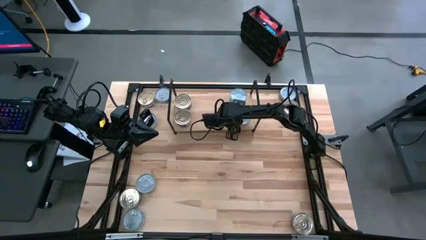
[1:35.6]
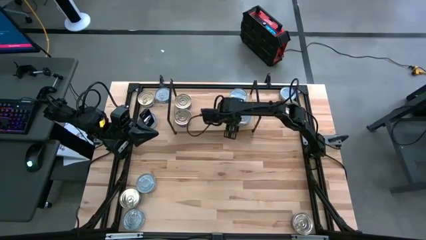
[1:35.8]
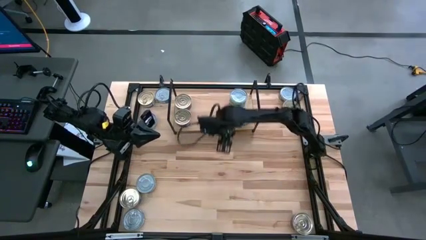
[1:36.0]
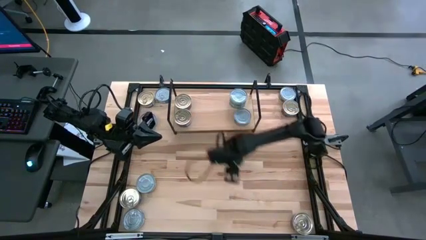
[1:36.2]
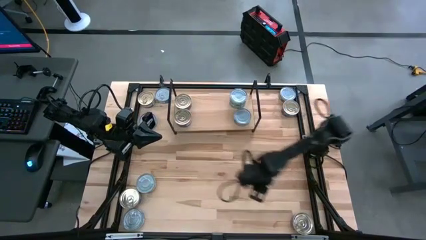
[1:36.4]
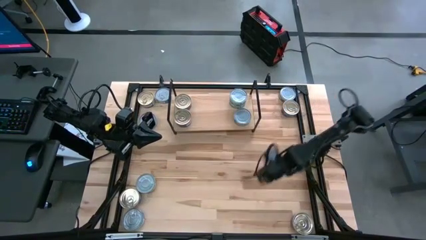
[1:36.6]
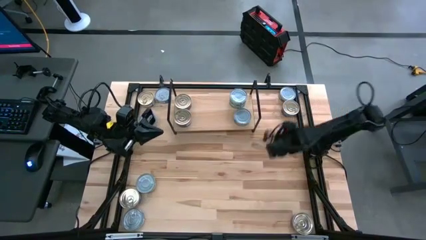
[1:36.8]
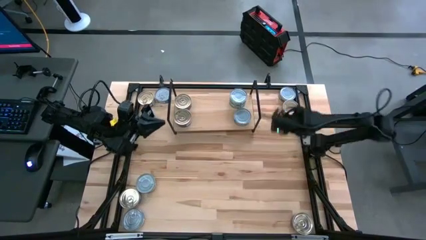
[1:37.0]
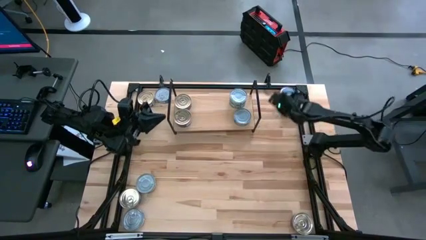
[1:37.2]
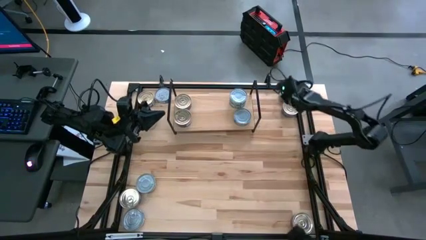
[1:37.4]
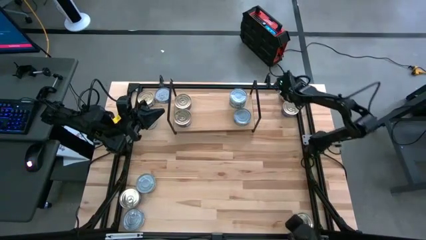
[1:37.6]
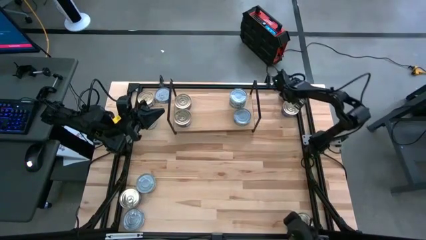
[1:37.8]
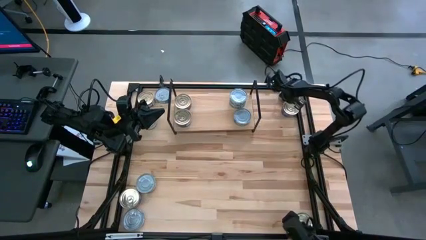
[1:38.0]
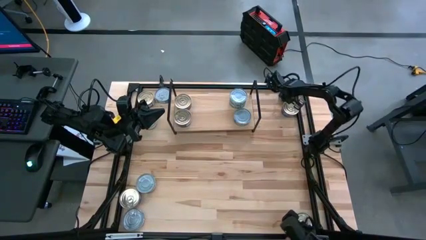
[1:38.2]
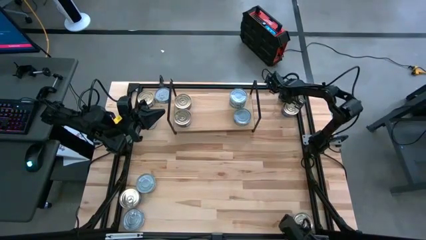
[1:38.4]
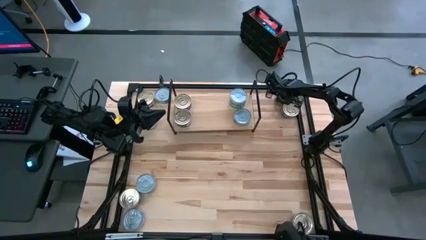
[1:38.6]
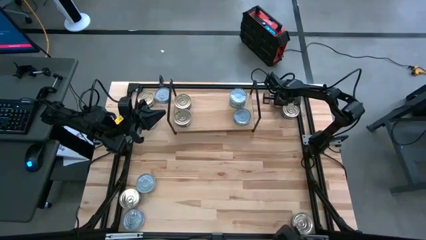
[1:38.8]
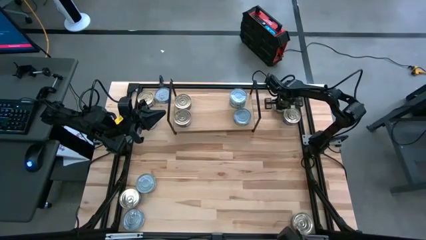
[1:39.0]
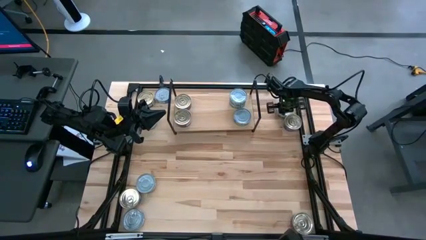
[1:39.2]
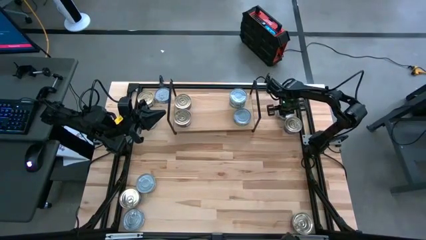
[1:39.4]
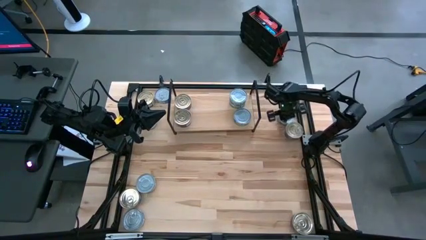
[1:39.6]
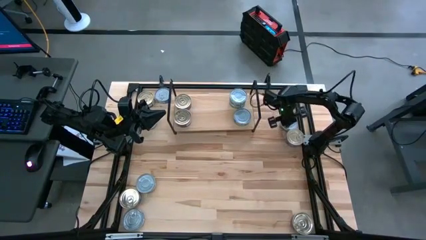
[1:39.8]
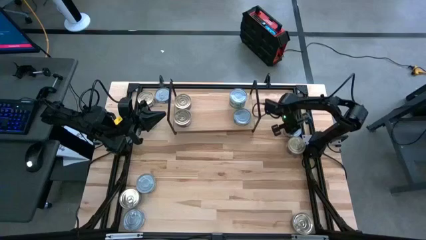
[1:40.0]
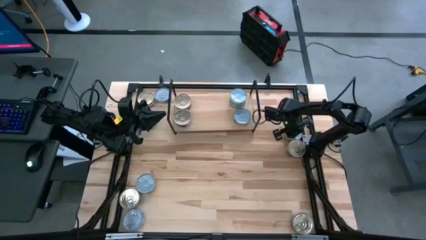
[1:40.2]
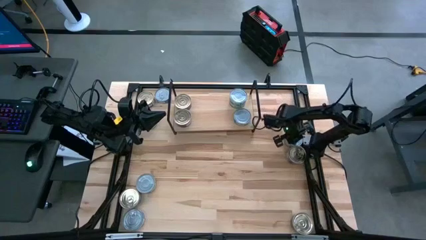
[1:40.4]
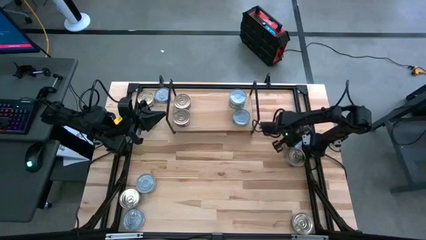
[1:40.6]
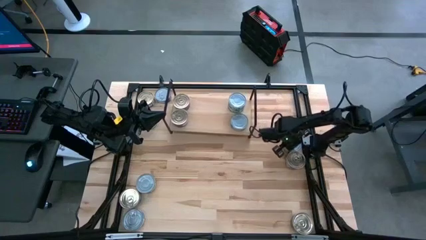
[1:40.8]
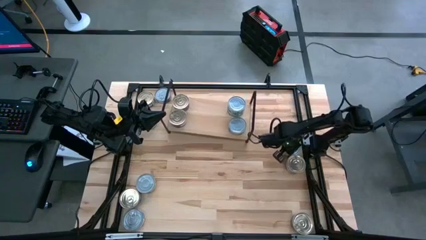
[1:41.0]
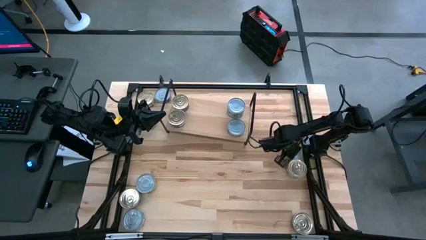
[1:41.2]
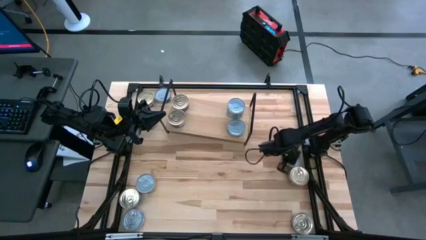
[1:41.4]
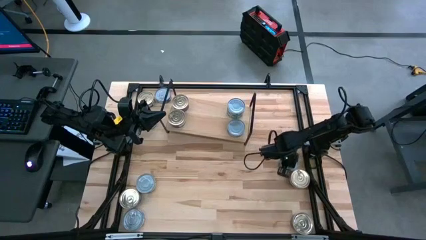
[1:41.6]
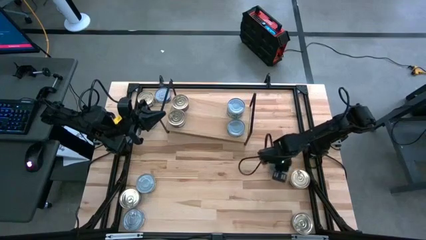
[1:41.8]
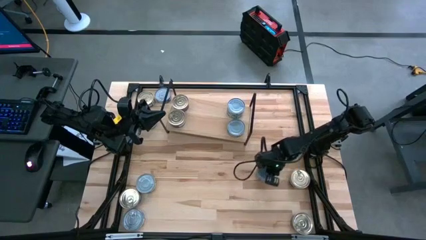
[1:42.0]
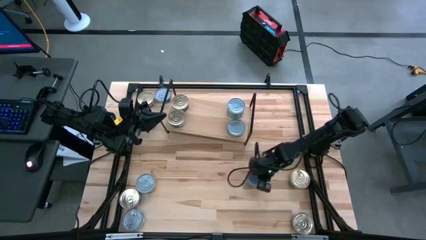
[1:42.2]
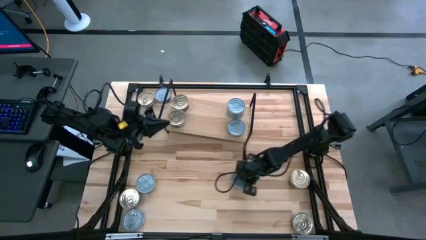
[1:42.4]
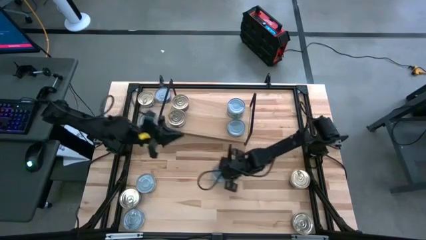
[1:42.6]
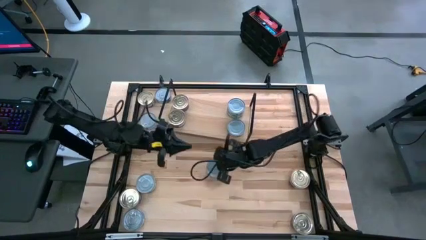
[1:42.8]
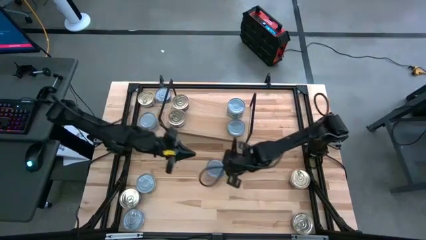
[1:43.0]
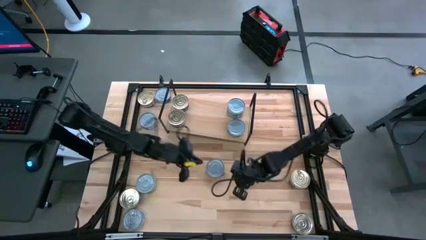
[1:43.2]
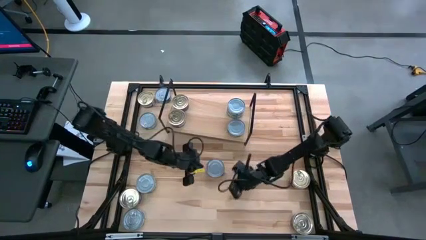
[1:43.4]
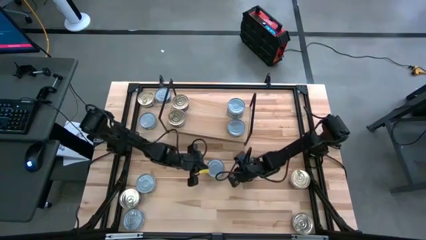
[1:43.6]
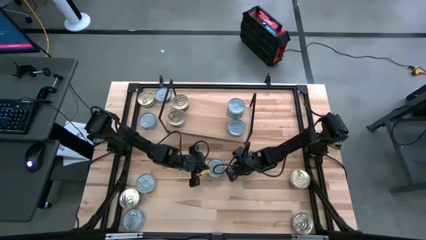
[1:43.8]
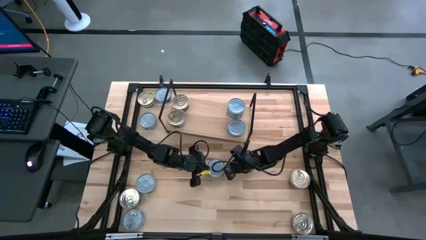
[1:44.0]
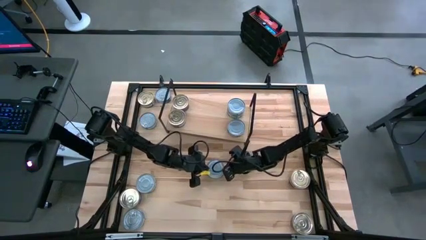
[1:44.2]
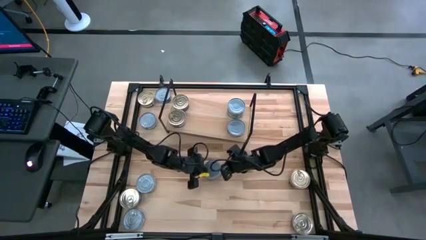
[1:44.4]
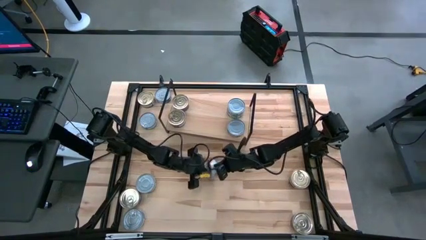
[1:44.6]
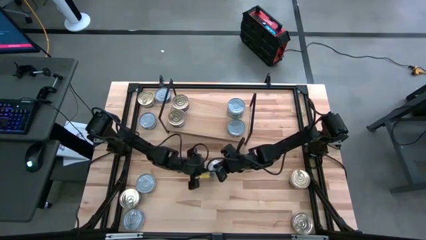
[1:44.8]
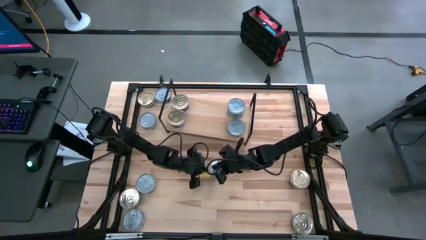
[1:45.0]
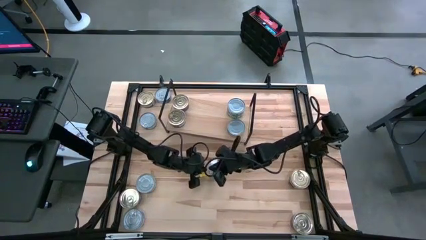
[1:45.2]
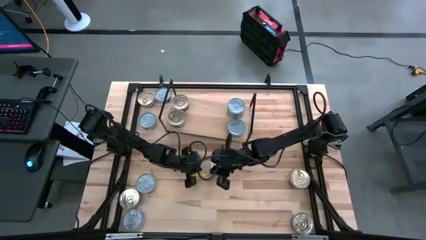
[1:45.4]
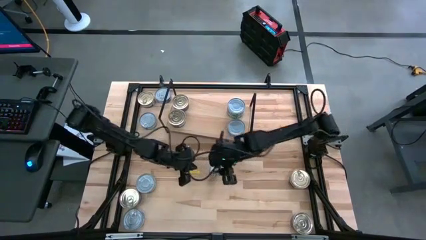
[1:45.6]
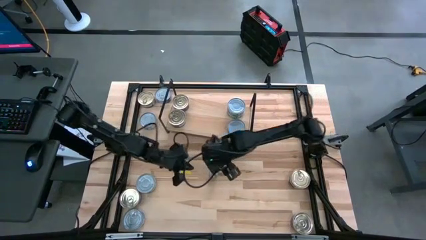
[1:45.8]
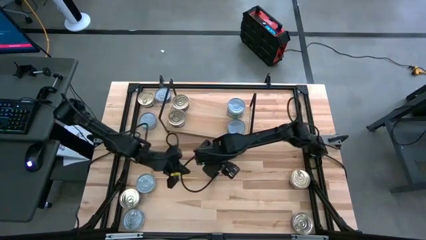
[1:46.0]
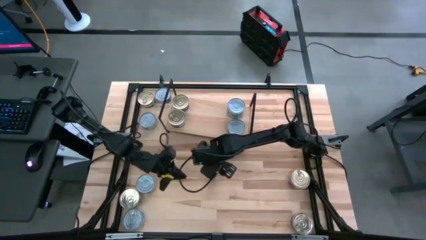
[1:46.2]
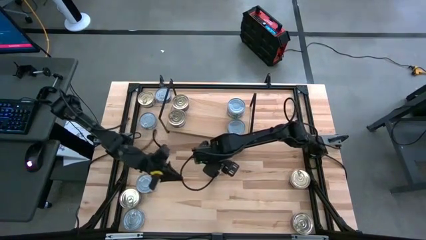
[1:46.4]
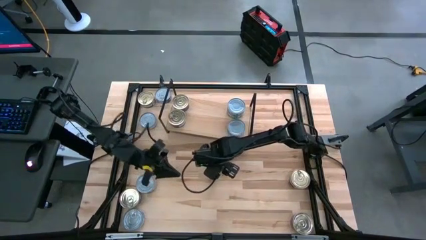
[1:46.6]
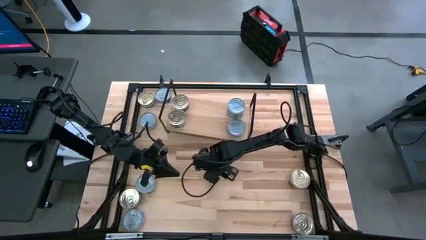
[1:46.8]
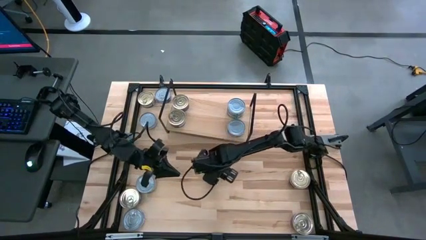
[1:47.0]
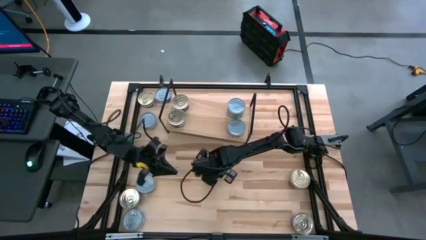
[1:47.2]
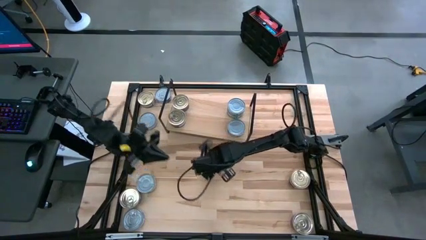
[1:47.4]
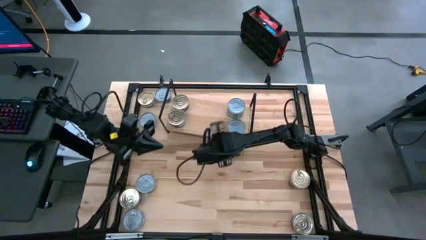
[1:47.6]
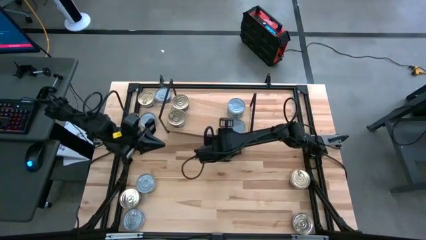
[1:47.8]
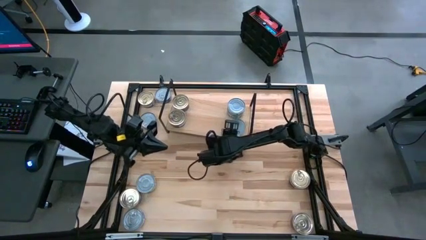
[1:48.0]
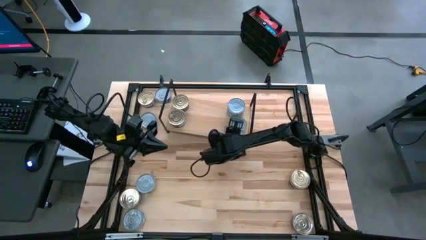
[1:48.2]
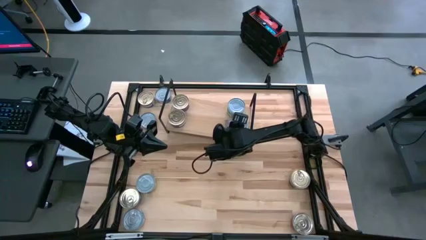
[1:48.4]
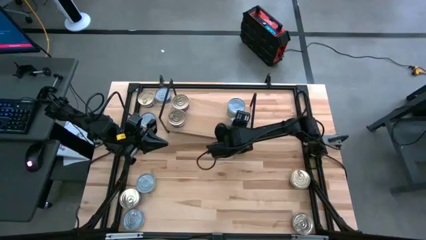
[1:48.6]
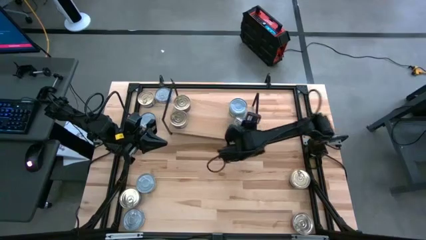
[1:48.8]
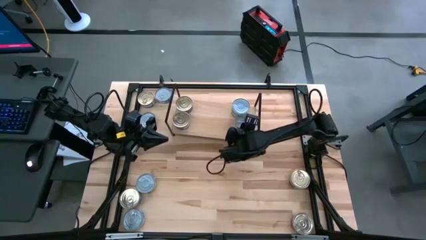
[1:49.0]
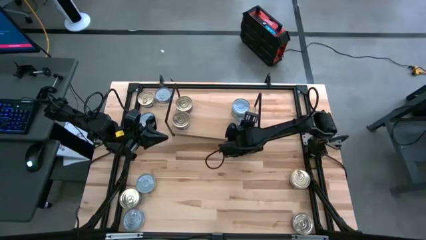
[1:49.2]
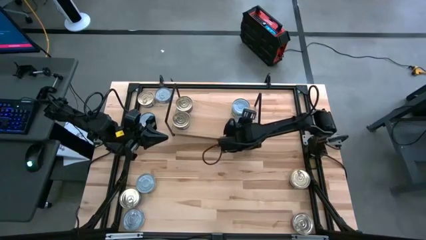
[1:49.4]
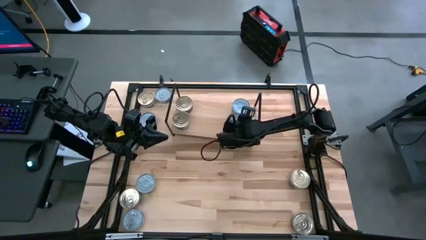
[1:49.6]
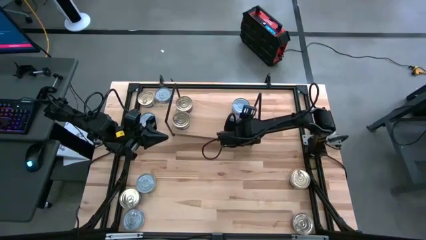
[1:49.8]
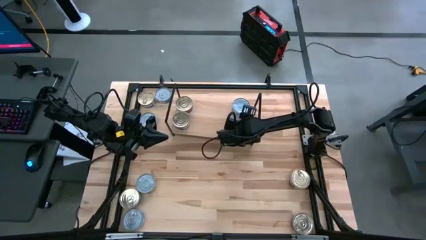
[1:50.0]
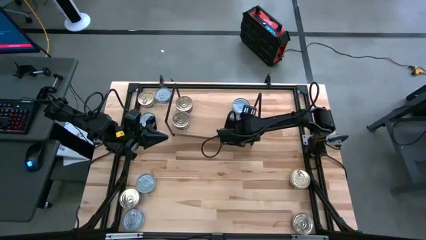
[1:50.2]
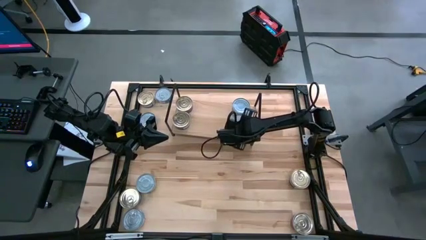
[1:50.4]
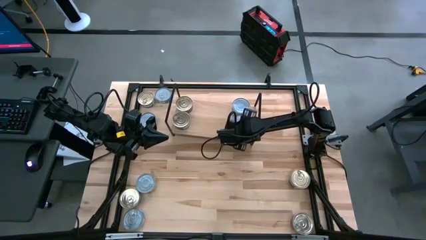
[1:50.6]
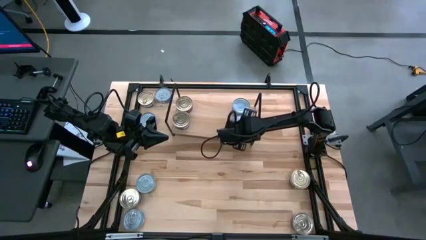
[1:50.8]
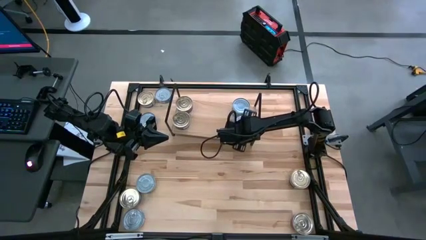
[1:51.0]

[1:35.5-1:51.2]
Task: Stack canned seafood by type on shelf
Stack the green tuna can on top of the other green tuna can on the shelf
